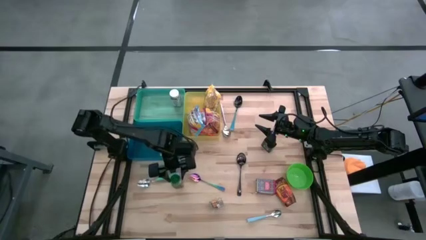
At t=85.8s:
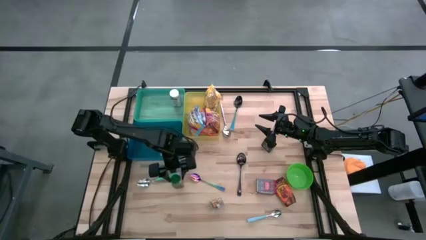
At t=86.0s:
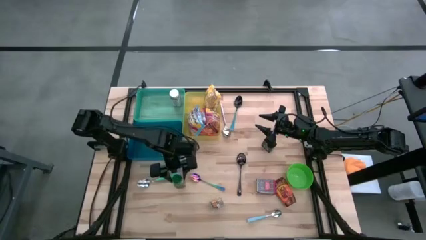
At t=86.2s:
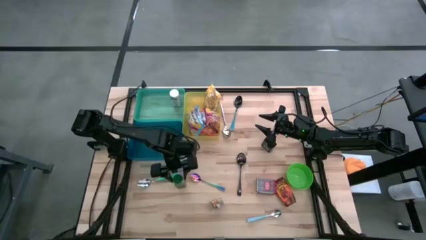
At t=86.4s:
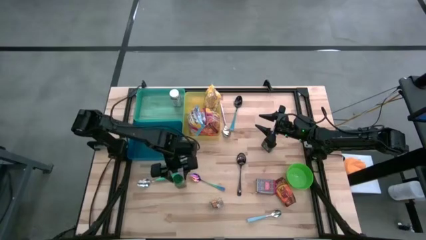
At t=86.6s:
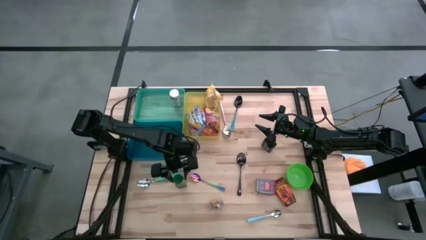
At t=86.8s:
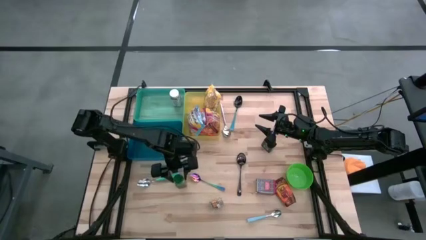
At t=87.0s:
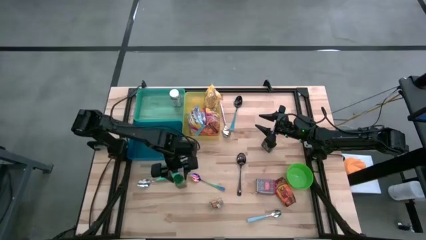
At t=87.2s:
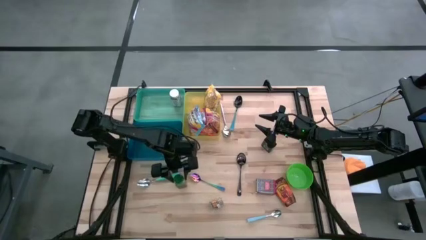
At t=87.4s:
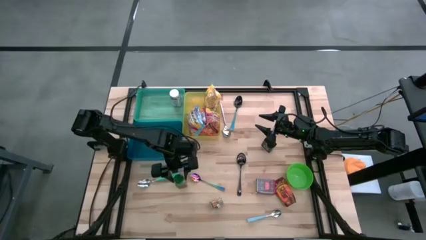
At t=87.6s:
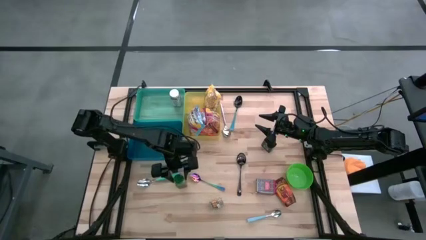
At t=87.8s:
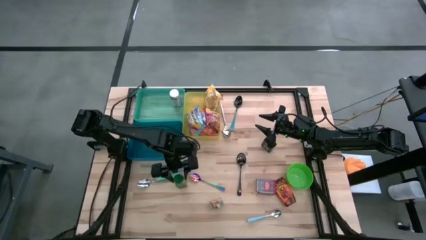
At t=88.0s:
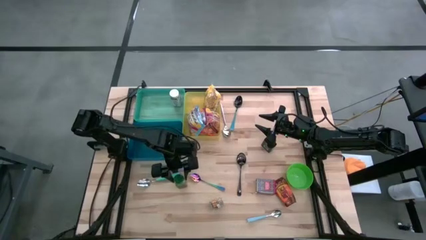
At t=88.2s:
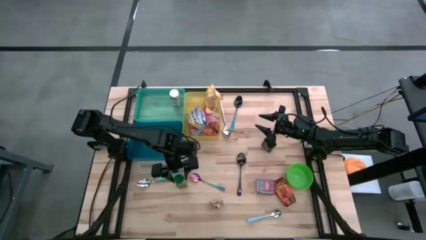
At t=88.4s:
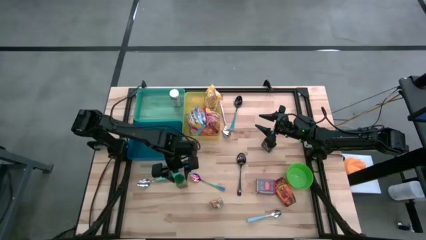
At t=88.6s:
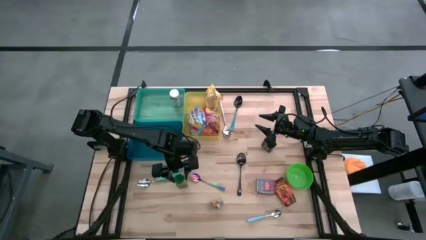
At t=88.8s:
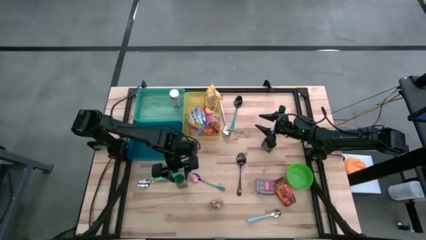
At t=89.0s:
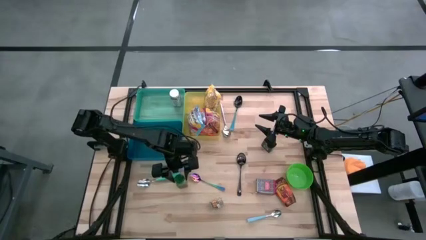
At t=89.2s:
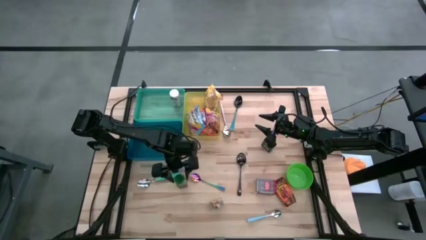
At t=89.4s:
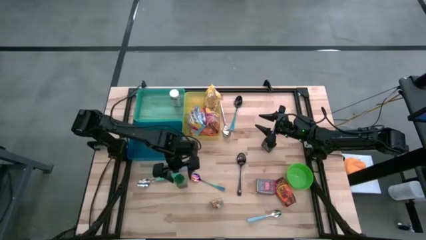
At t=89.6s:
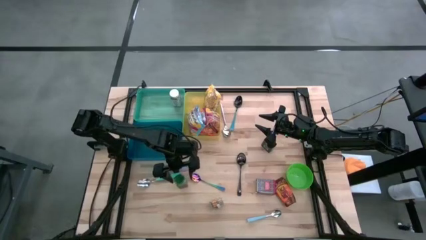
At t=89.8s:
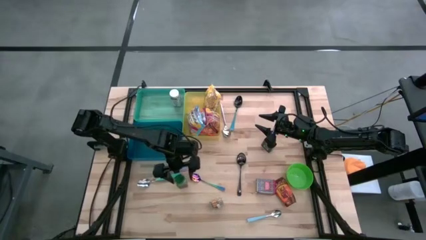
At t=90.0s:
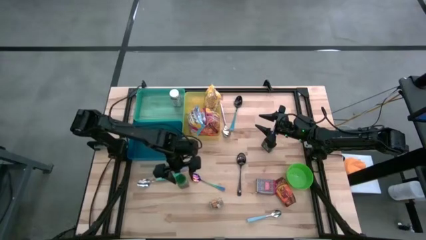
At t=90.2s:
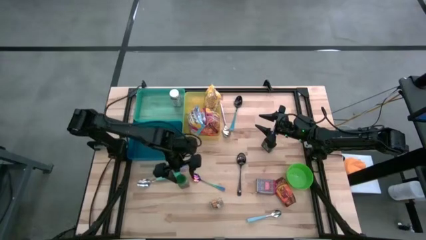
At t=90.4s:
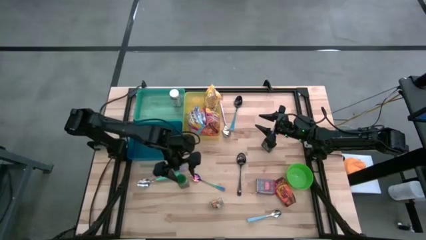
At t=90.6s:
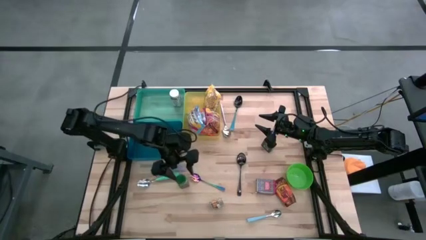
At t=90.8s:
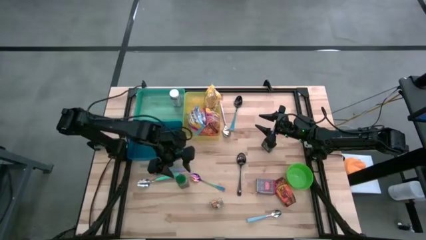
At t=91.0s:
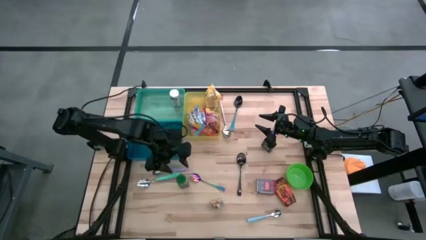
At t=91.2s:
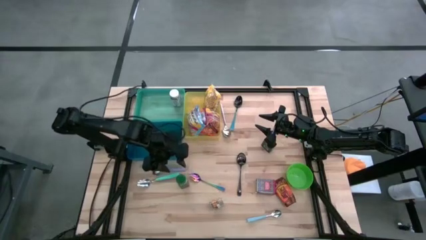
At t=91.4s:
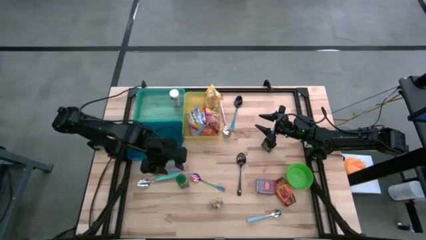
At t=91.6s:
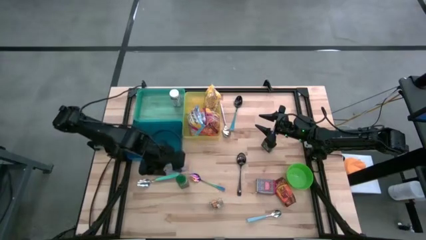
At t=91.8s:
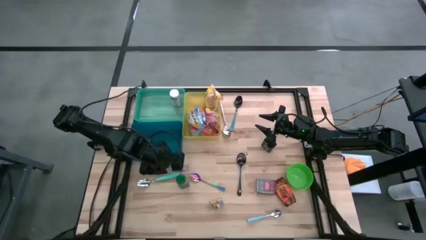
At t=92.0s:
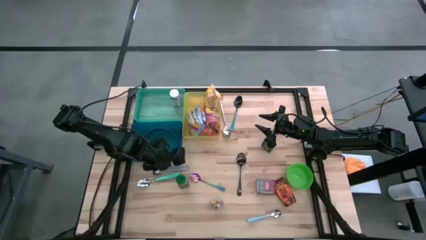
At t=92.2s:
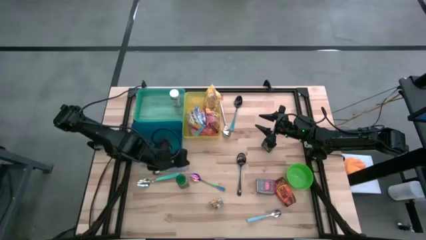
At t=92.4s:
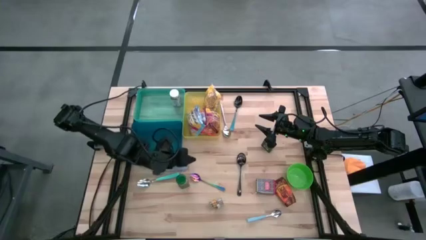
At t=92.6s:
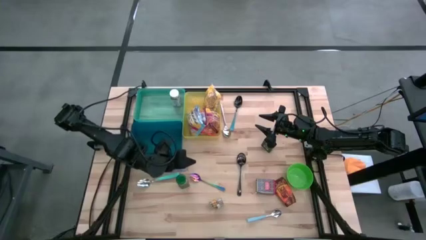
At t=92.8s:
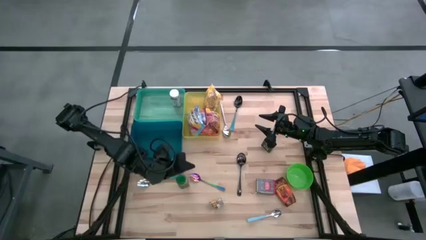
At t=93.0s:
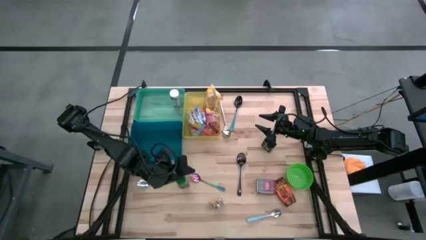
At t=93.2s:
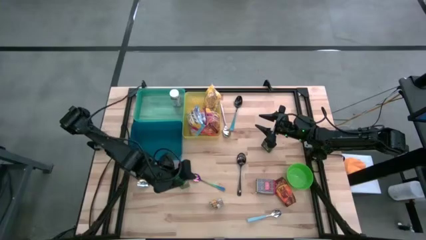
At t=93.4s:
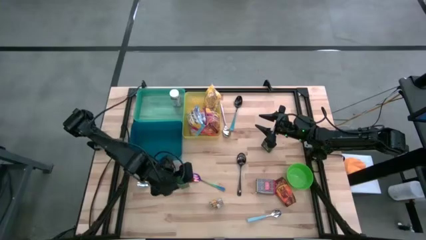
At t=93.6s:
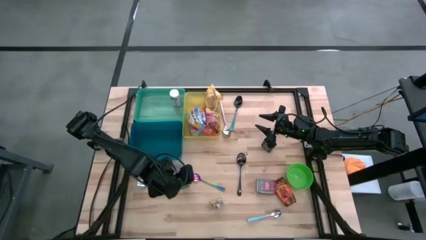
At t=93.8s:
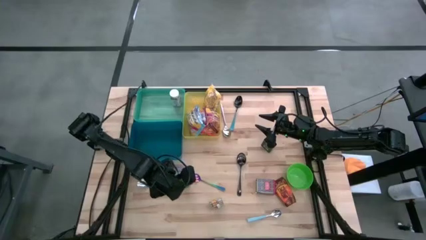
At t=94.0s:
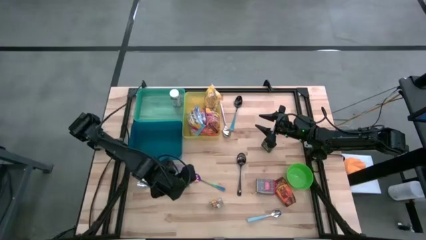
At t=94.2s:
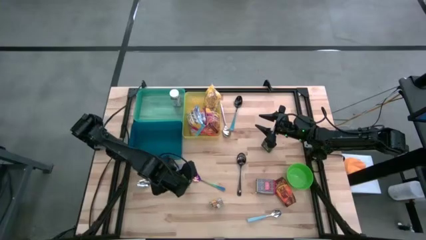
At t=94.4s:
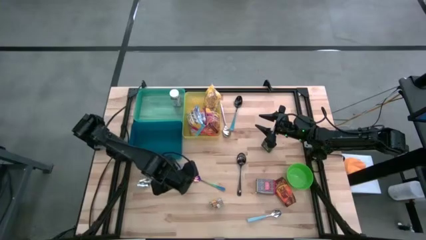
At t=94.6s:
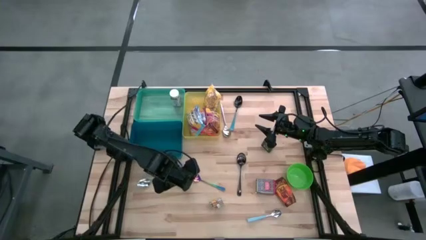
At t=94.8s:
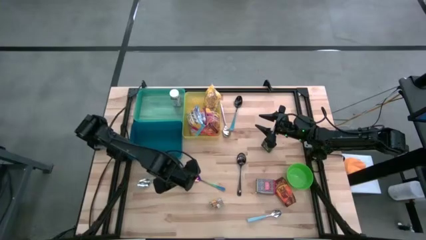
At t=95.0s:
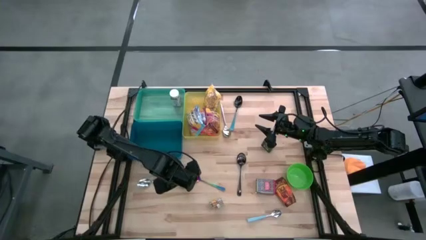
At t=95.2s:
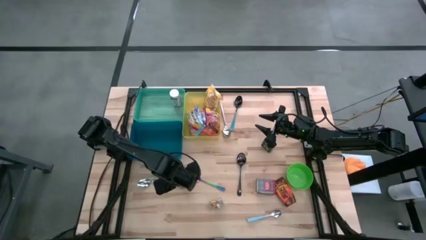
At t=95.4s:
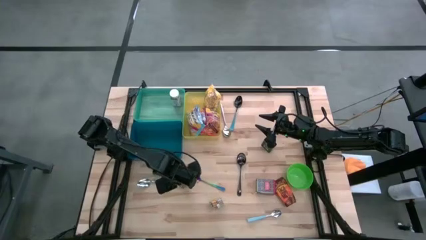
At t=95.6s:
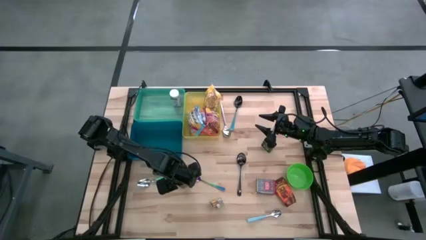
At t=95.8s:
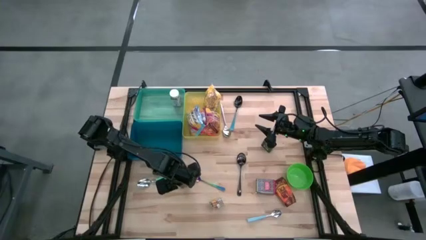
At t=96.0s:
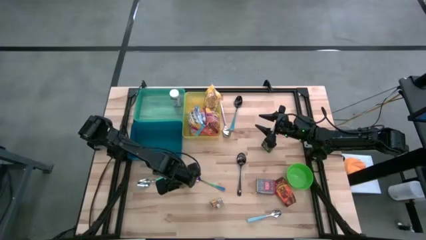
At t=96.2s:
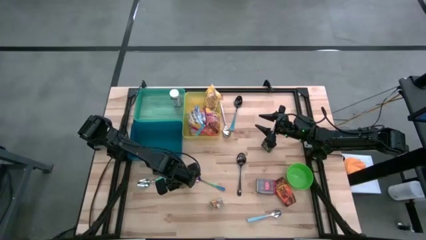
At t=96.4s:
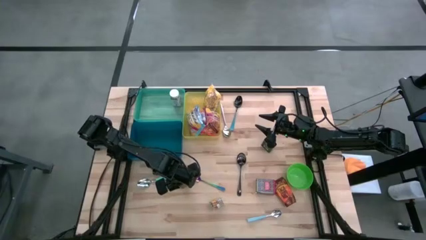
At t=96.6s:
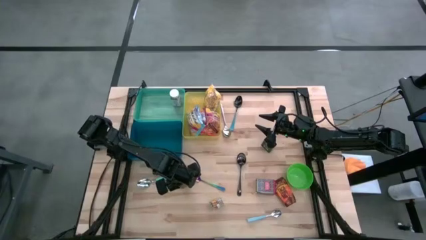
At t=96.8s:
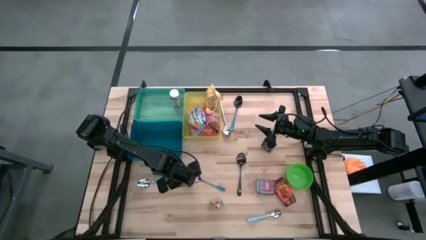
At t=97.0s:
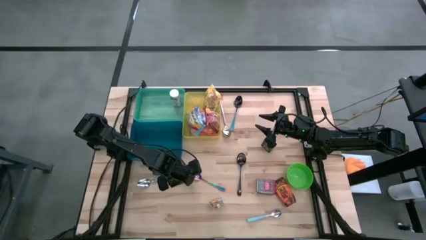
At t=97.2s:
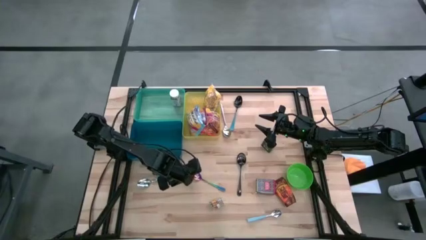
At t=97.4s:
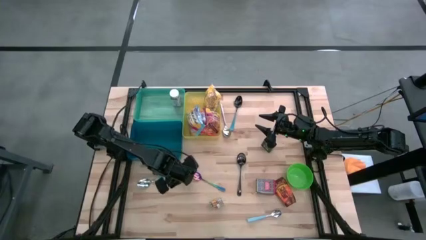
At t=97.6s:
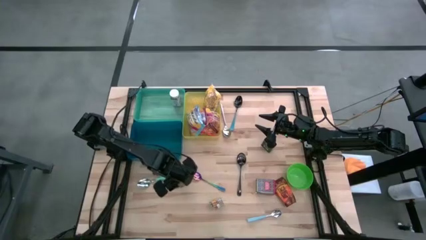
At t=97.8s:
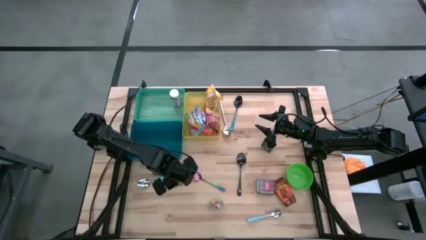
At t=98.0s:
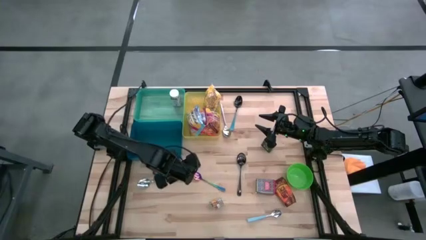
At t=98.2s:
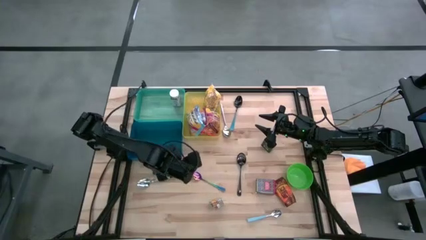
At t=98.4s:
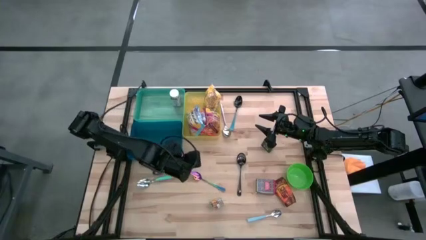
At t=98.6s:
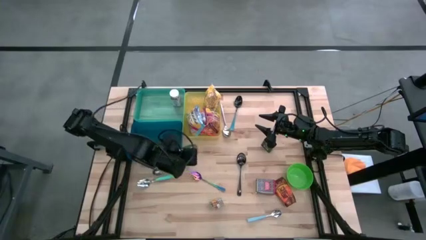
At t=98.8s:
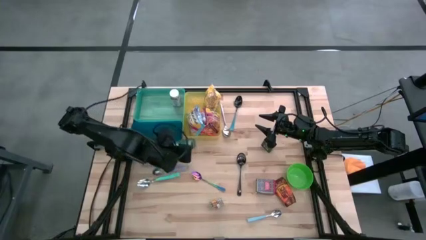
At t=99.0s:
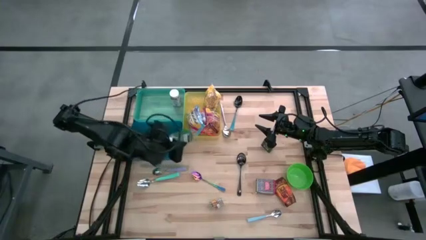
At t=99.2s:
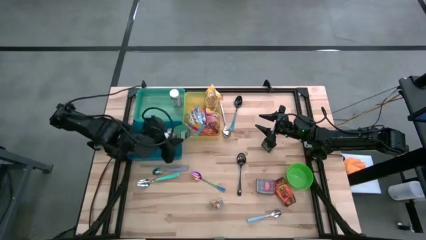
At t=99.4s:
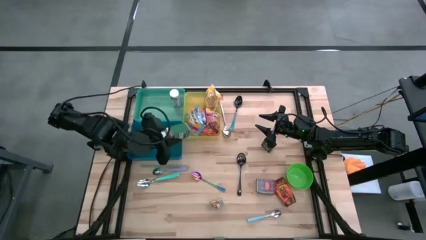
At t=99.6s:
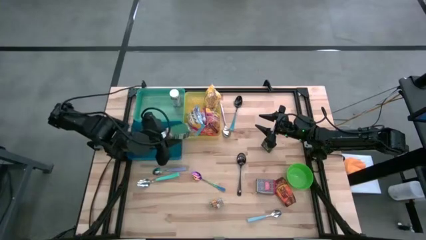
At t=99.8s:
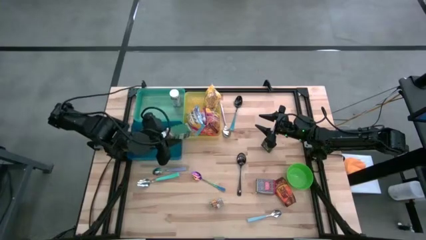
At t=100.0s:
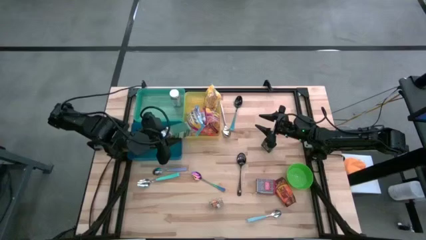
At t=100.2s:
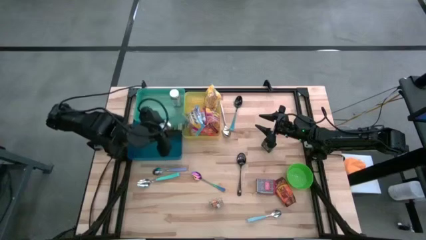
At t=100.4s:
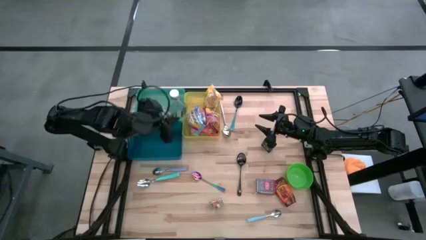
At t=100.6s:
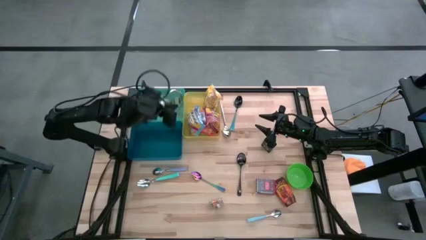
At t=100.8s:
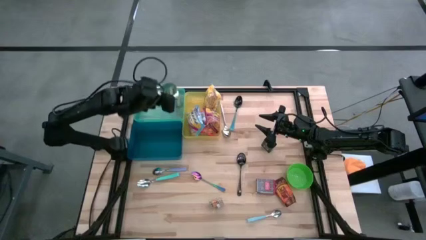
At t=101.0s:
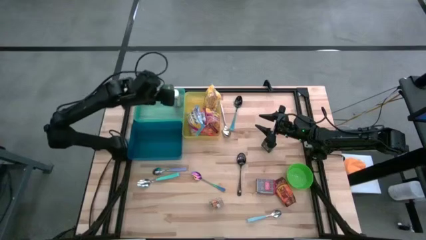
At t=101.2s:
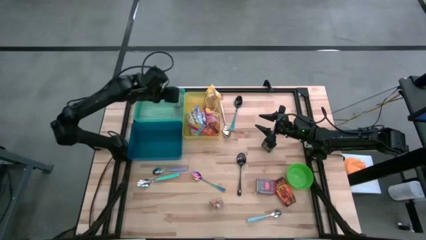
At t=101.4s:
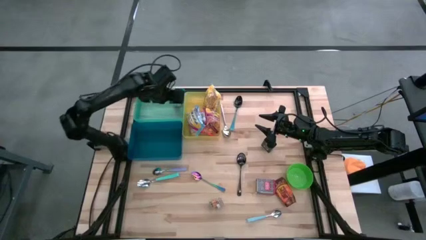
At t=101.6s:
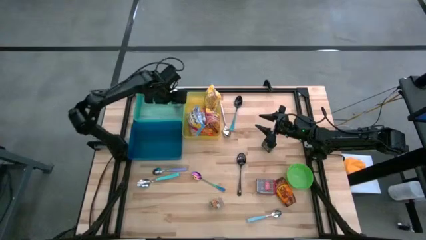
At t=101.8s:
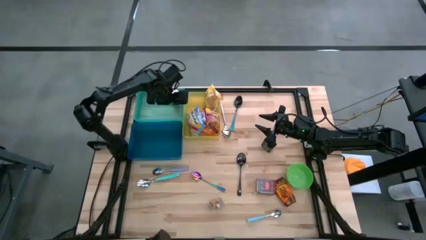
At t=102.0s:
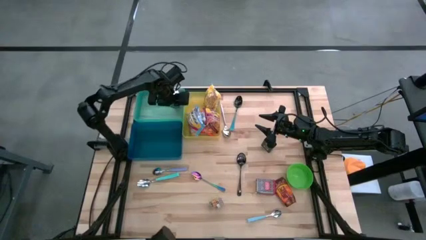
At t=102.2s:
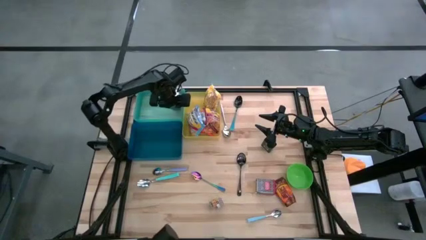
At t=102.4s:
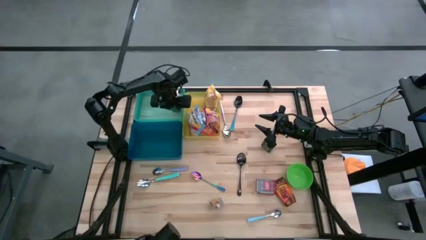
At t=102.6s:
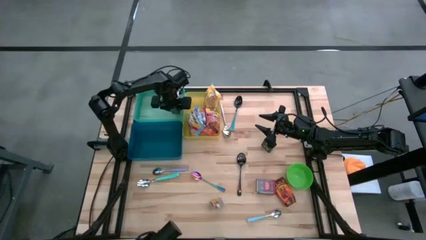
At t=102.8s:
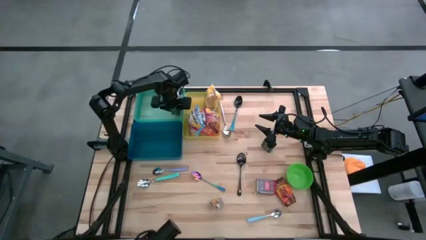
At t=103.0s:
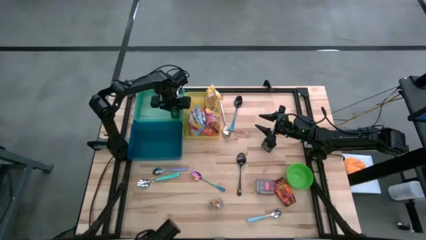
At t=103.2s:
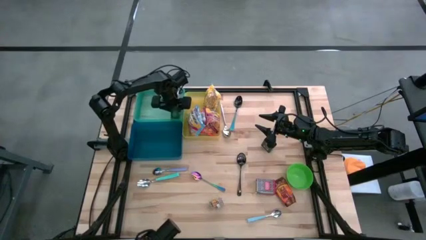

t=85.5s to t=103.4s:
Put the green spice bottle into the green bin
